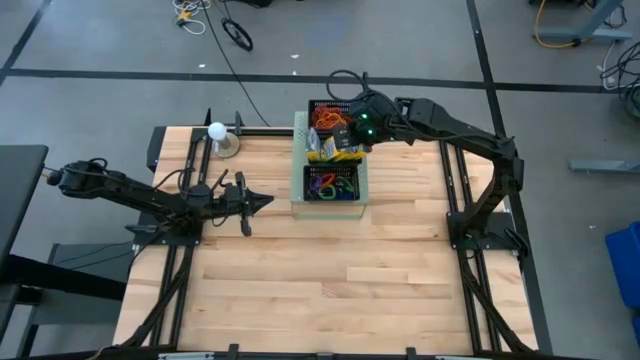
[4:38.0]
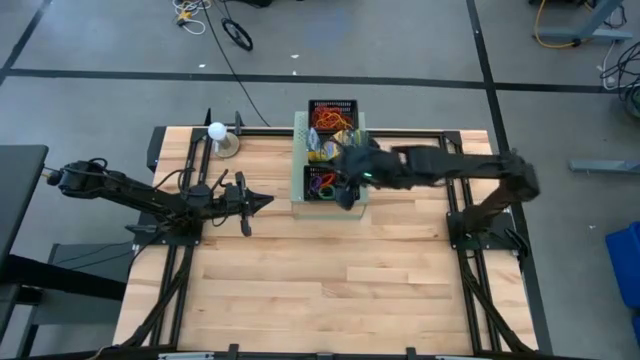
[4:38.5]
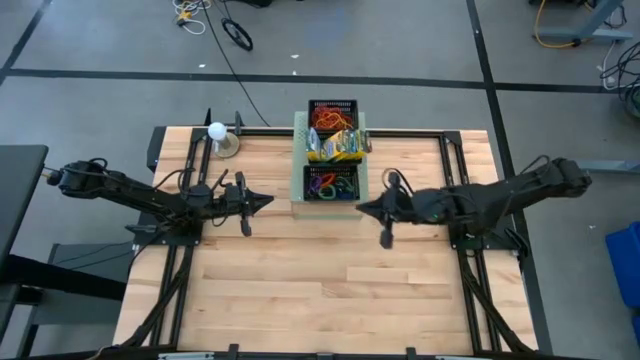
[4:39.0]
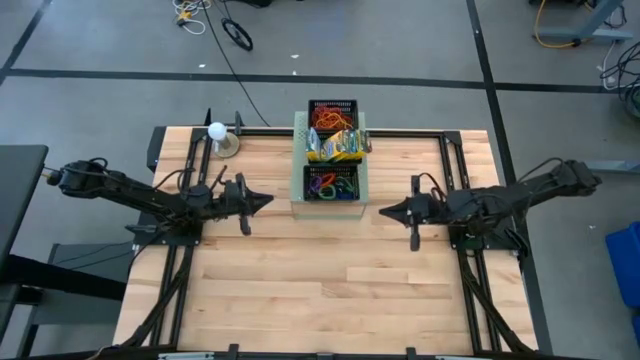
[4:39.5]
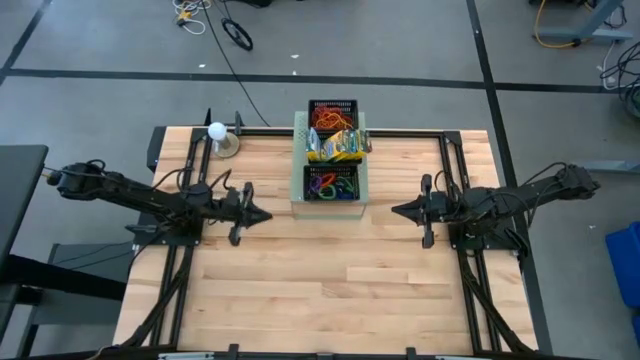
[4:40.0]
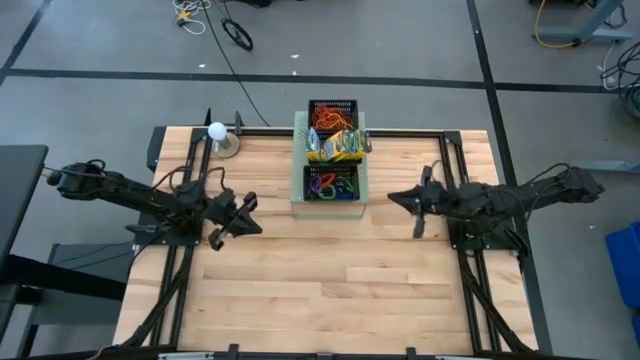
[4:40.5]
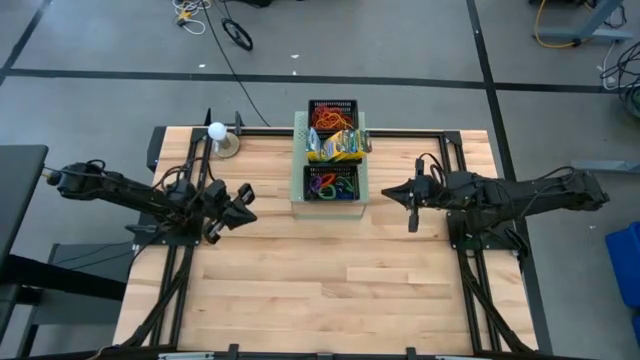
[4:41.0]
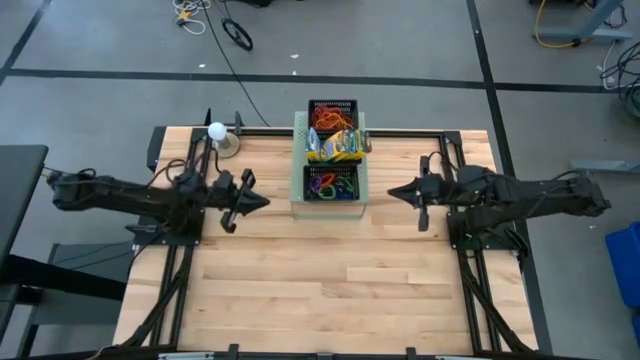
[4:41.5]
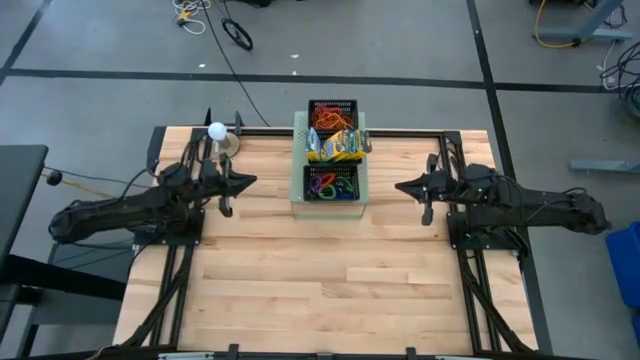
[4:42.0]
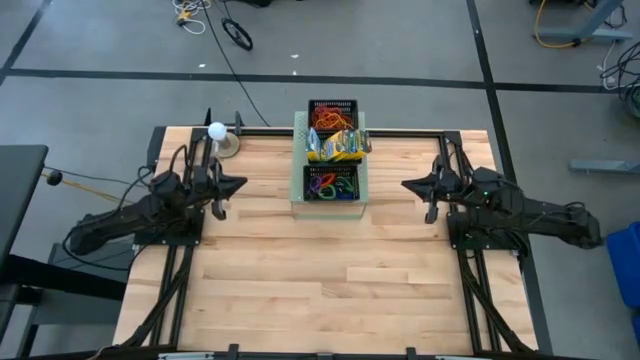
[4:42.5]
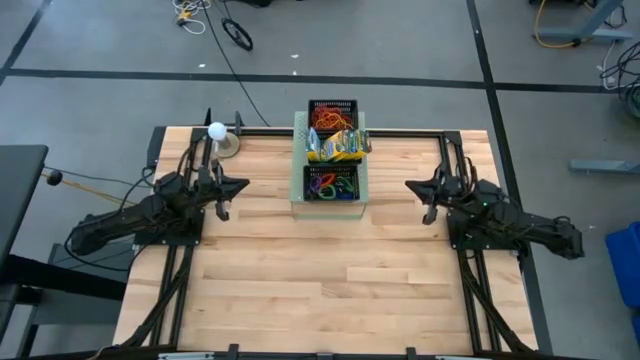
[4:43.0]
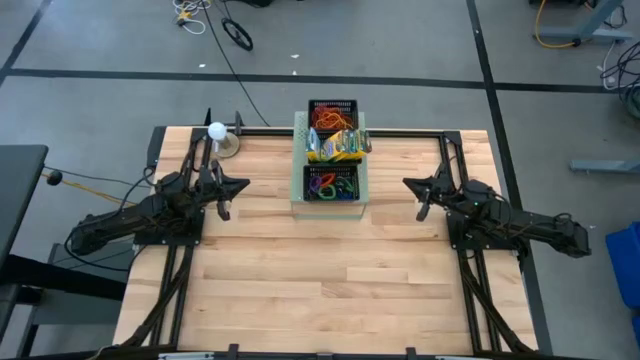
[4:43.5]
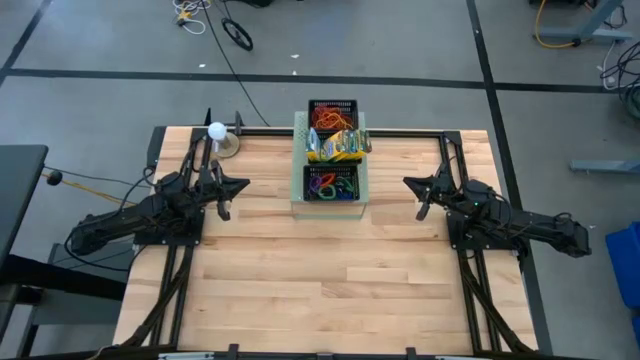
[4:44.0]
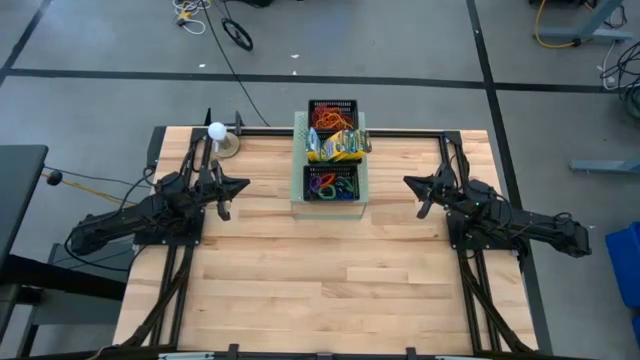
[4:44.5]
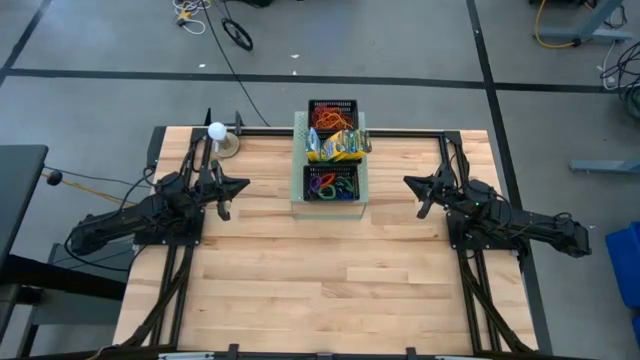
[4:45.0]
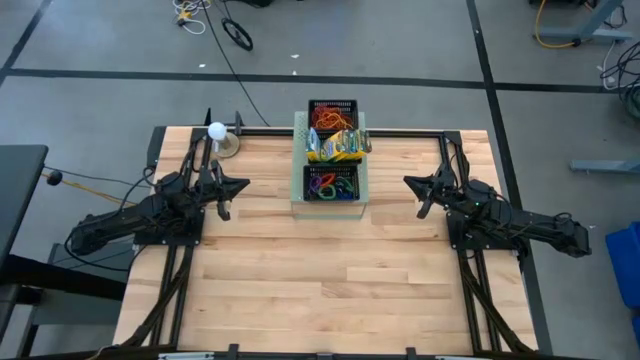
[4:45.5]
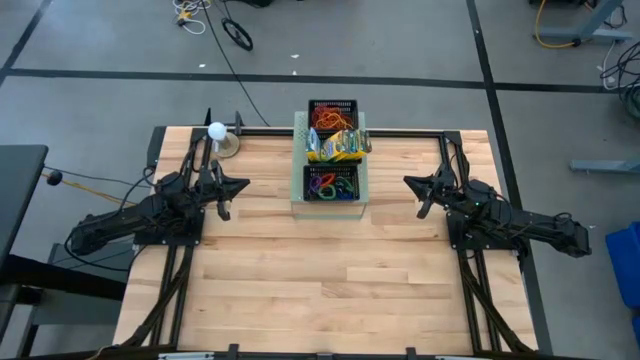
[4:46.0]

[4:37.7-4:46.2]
Task: Pick & Place Office Desk Supplies
Return to Home Position

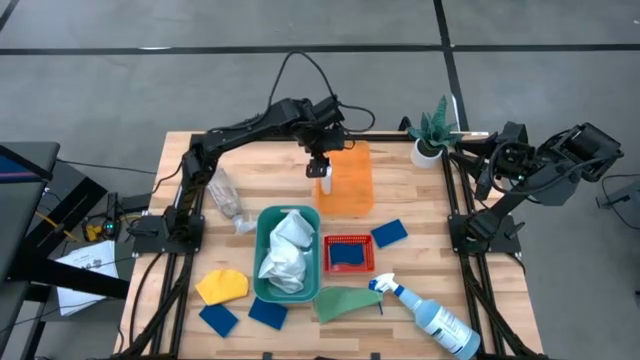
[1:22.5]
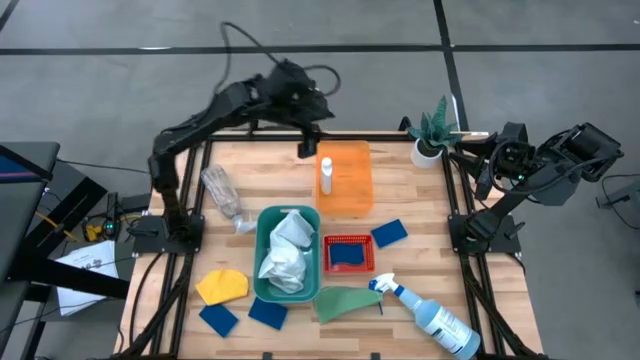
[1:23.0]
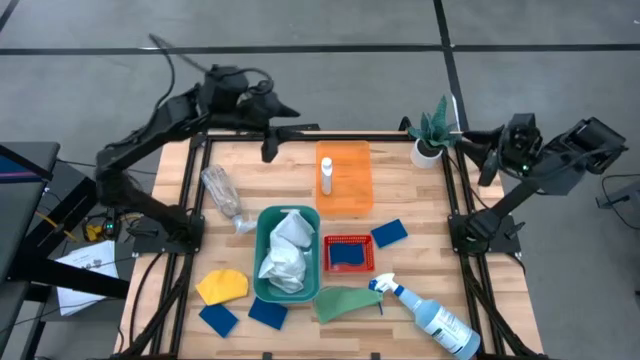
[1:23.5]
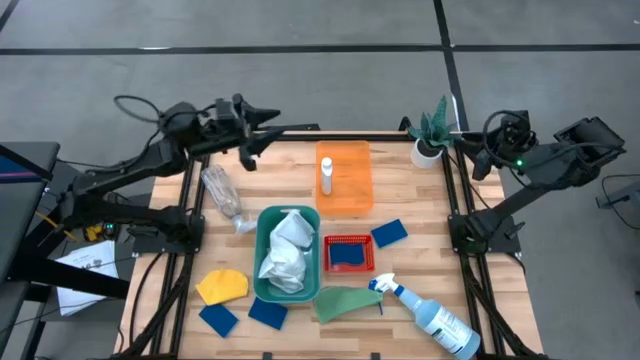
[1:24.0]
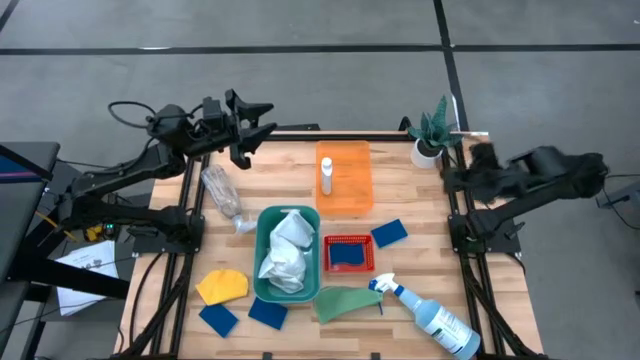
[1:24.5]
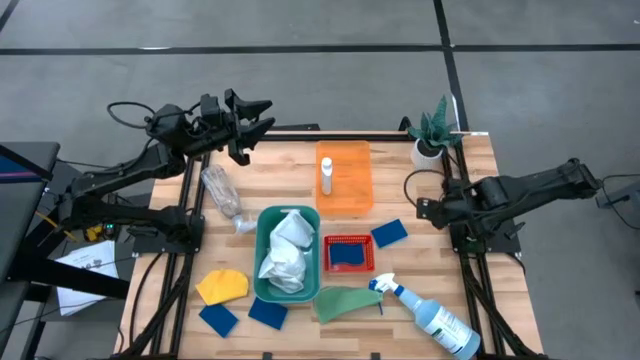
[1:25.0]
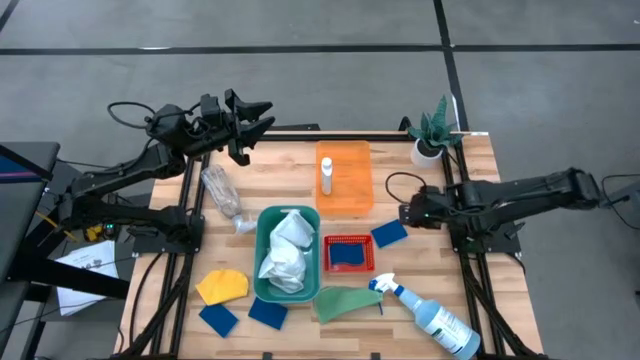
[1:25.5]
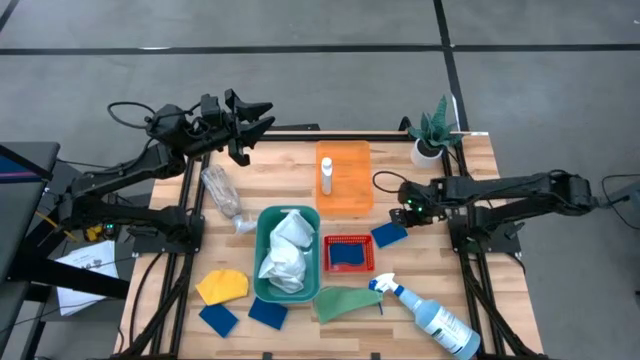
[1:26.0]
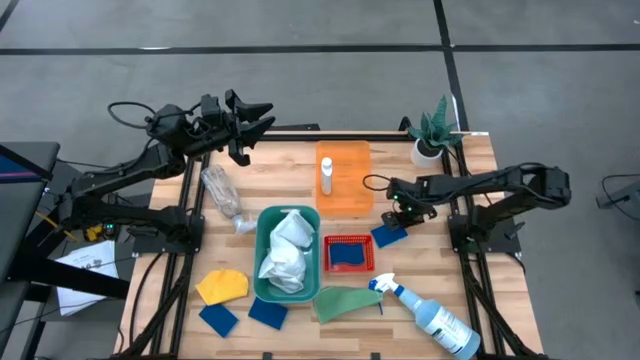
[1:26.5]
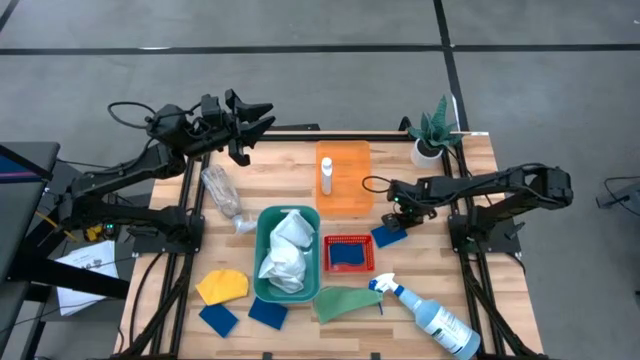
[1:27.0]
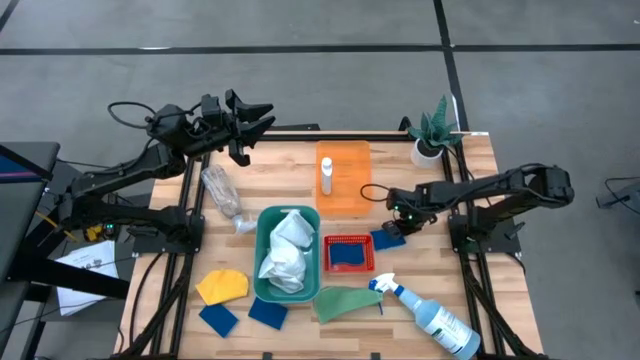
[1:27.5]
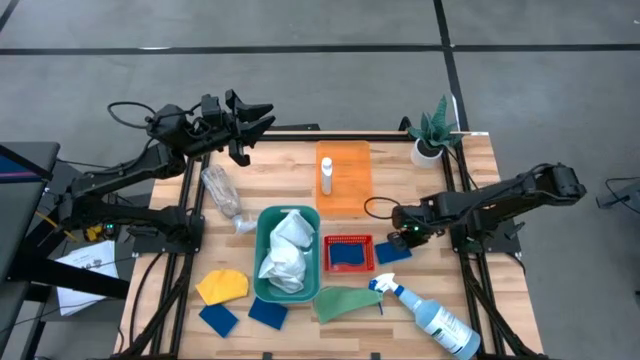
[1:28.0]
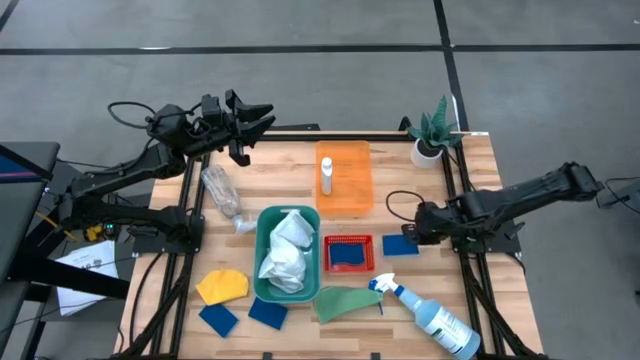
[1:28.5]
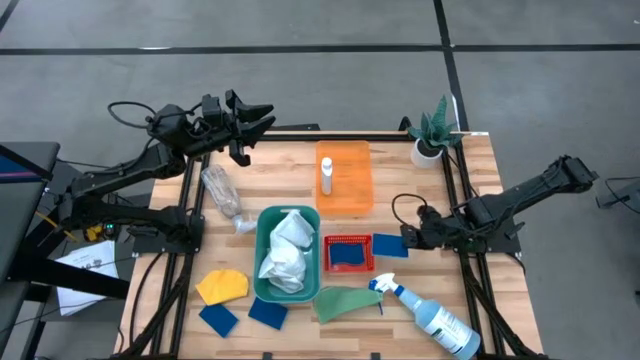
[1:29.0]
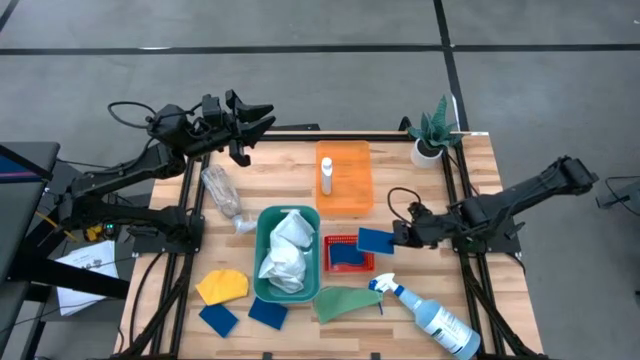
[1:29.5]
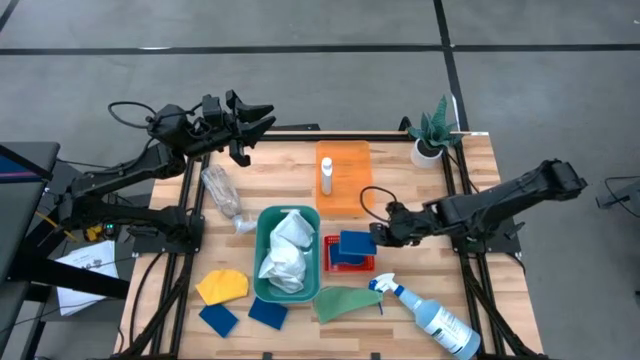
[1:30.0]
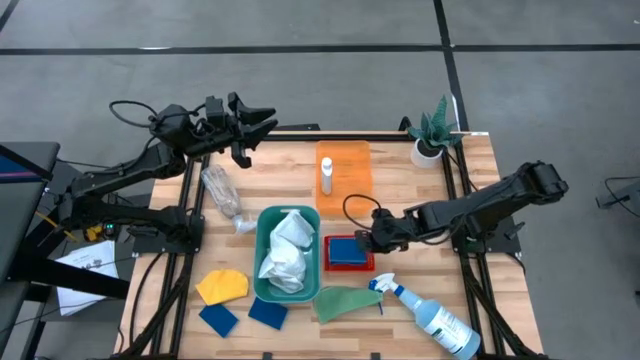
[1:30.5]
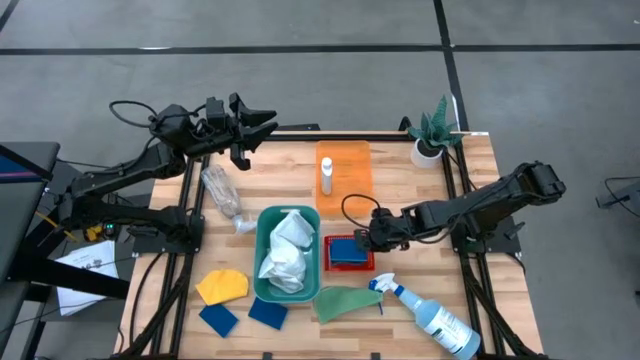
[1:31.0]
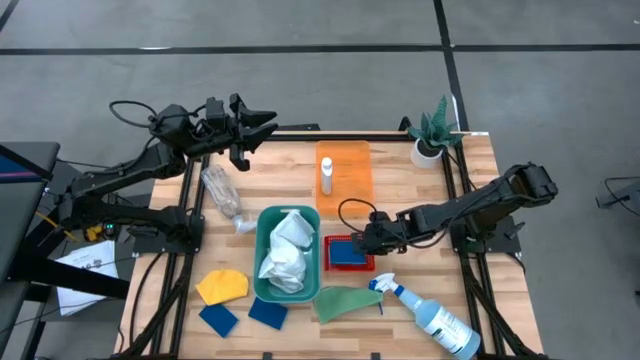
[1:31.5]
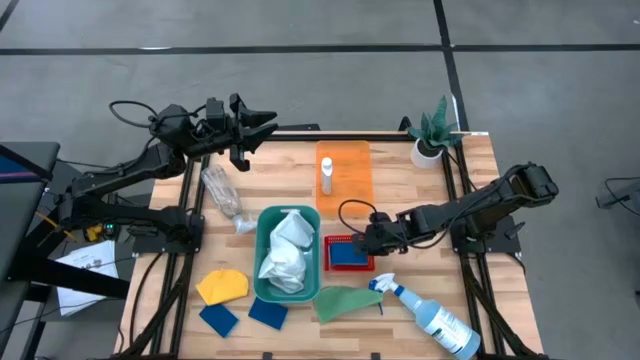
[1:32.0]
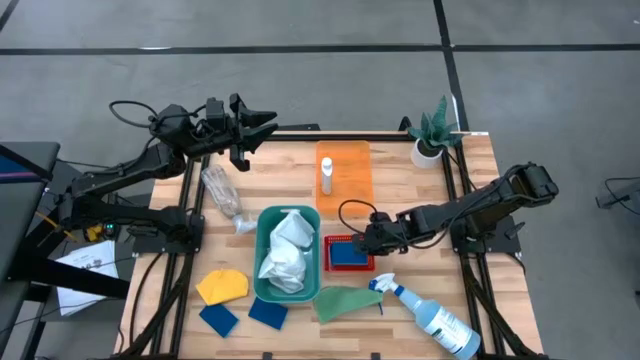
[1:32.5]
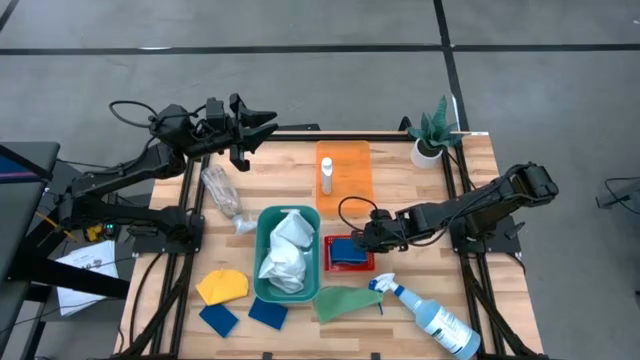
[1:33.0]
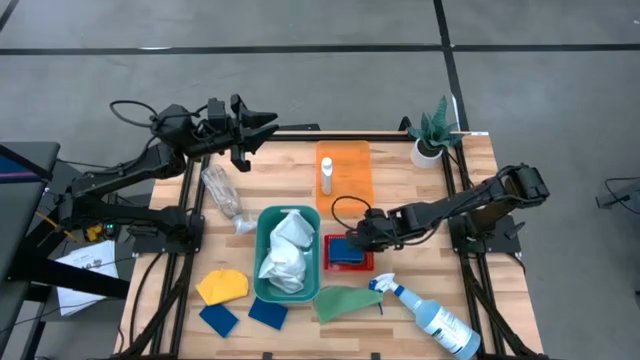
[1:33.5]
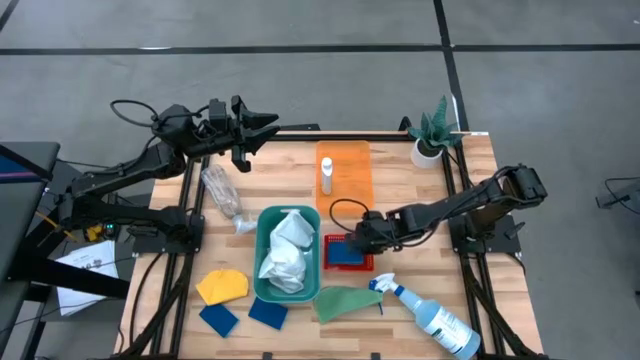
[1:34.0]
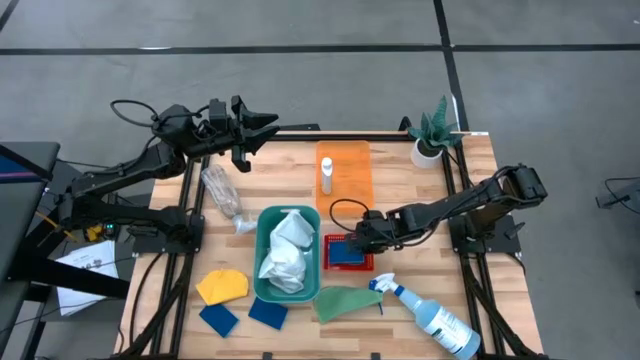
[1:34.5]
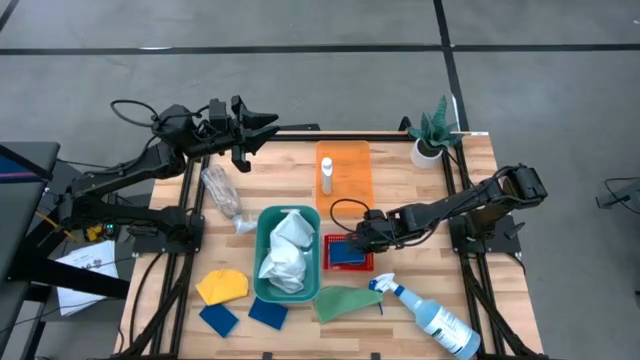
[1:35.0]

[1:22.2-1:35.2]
Task: Pick & Place Kitchen Items
Put the blue sponge into the red bin
